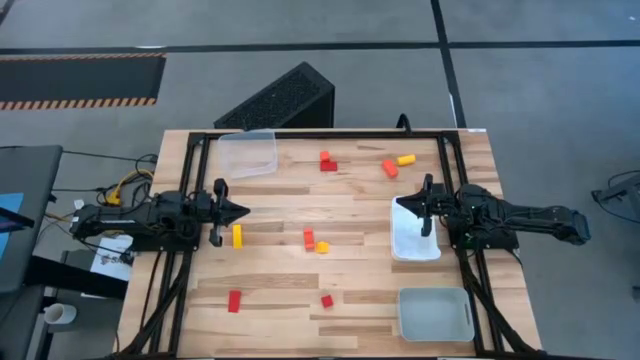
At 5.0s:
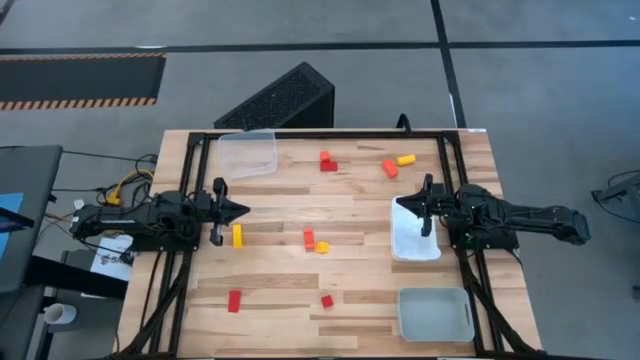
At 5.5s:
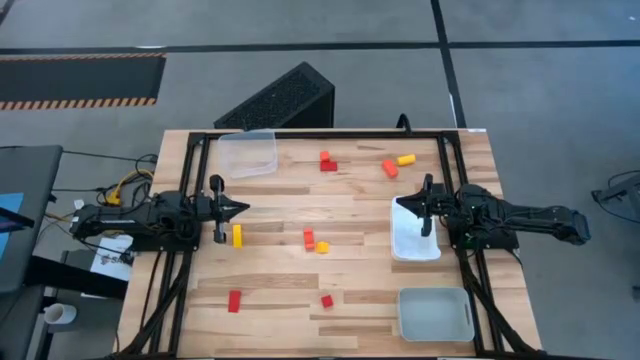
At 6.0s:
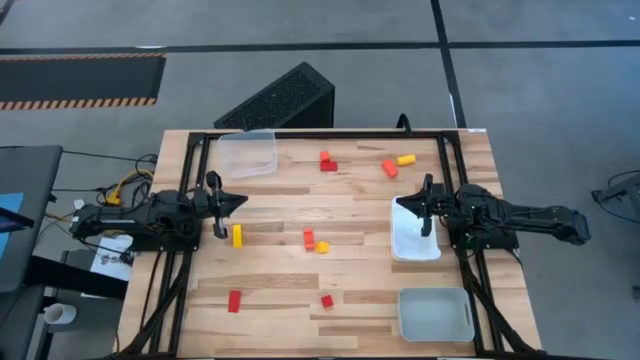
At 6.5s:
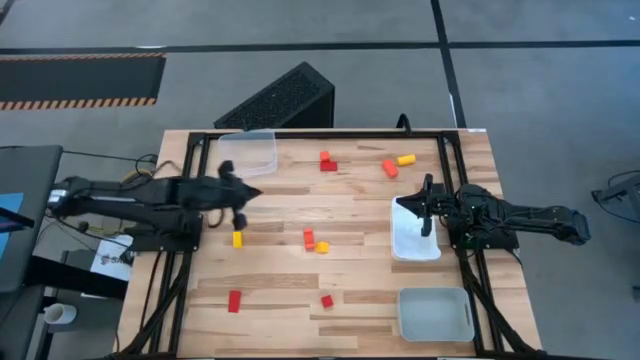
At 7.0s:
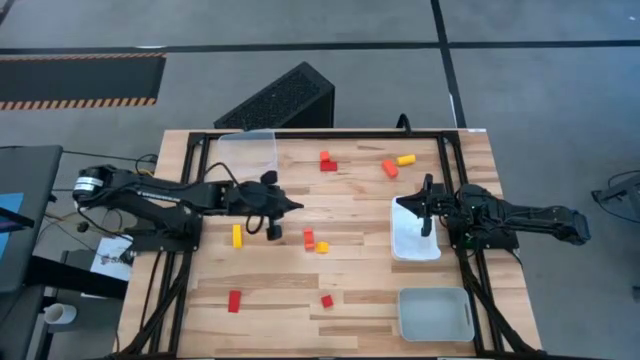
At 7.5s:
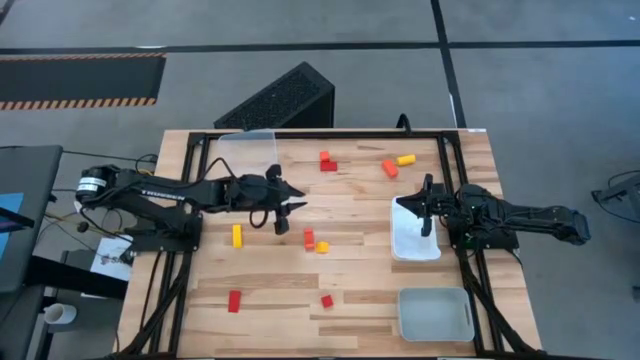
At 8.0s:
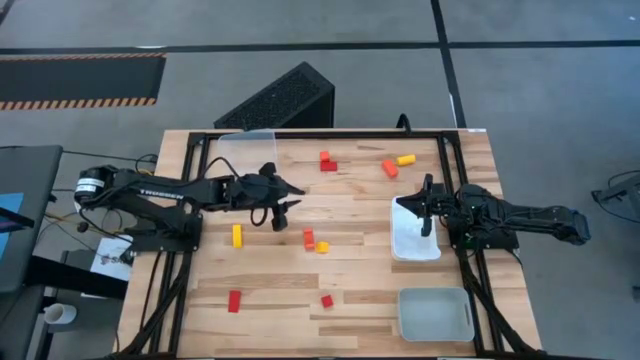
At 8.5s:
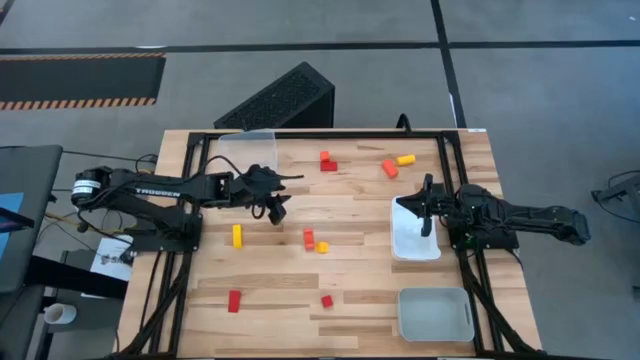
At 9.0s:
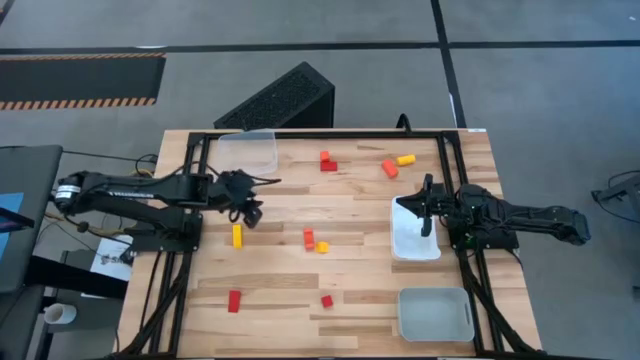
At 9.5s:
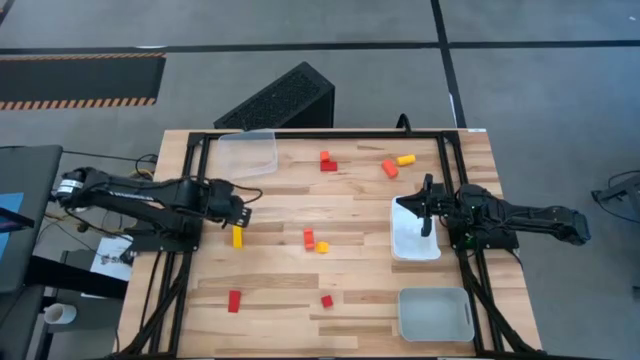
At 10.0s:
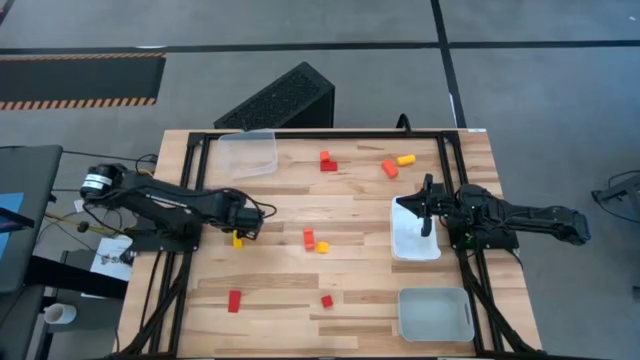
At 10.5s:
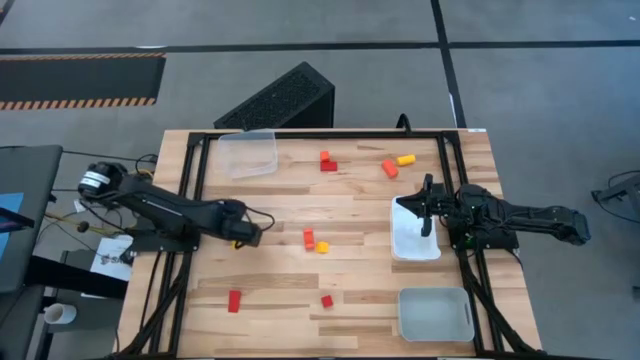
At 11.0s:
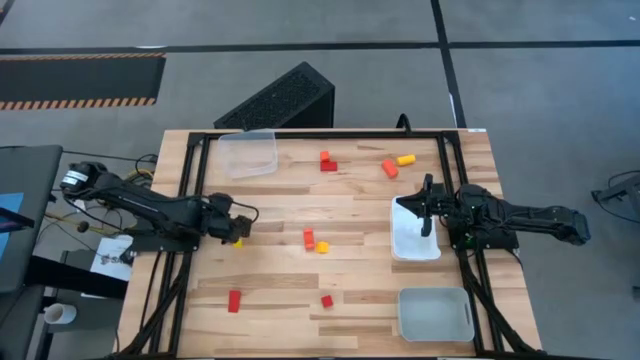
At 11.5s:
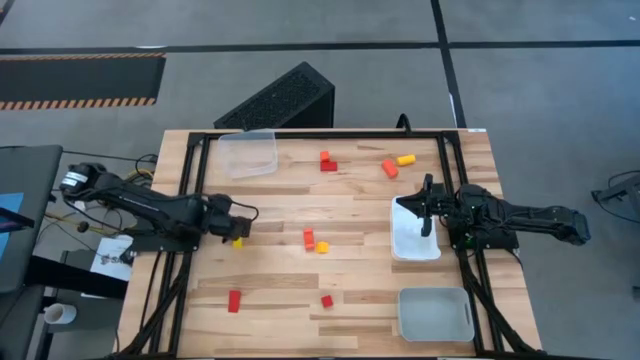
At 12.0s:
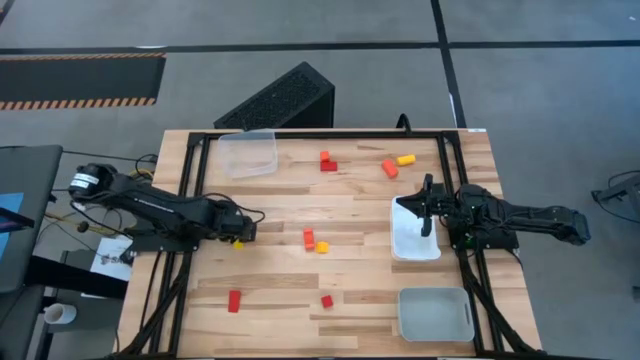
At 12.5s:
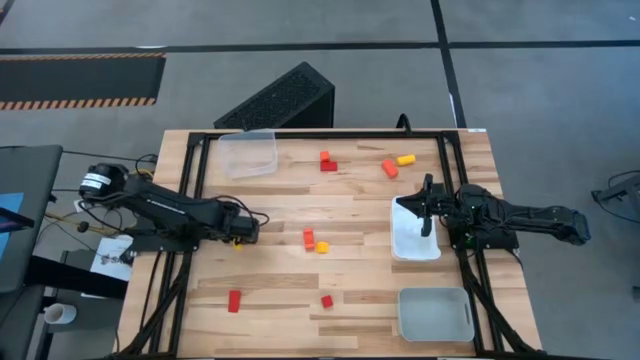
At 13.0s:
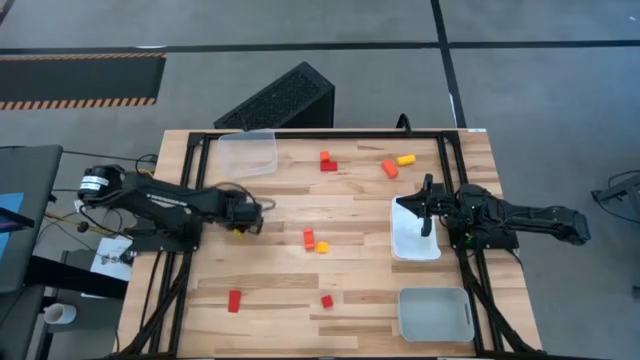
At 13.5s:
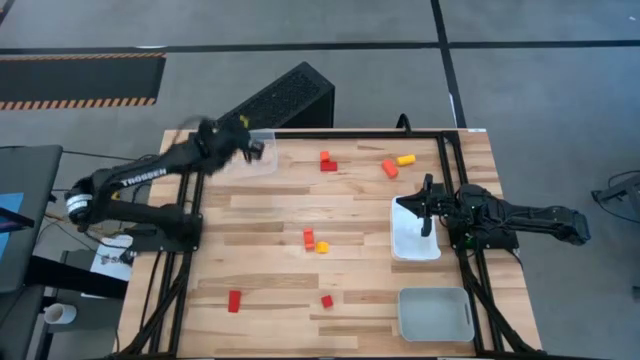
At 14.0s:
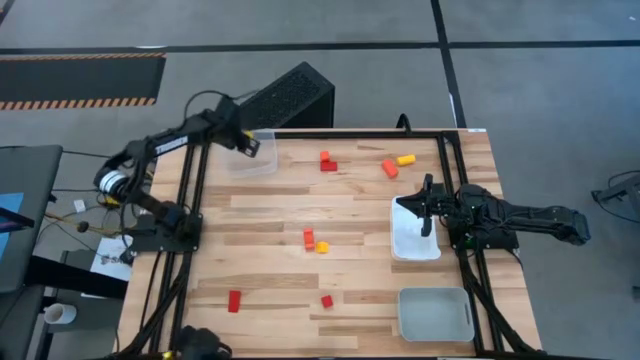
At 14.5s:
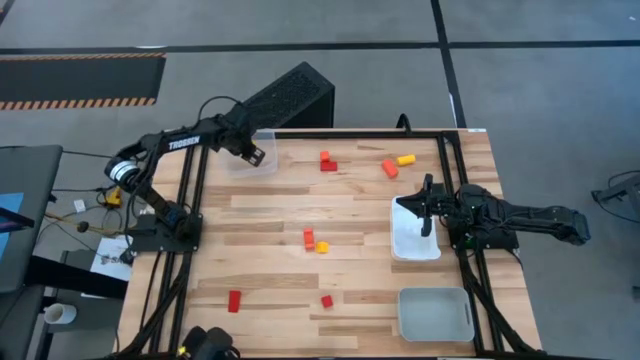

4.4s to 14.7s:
Task: Sort & place blocks by color
Put the left yellow block into the transparent bin

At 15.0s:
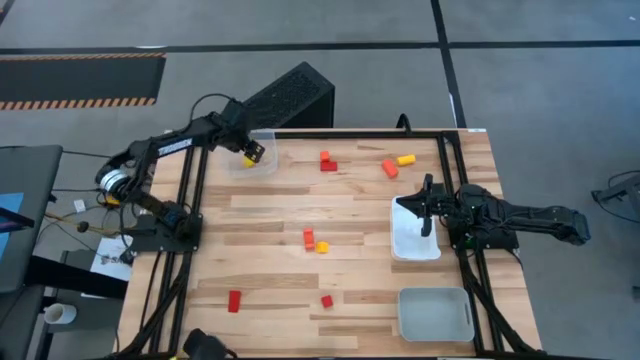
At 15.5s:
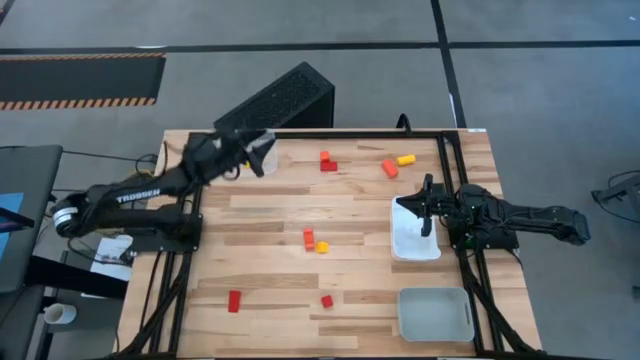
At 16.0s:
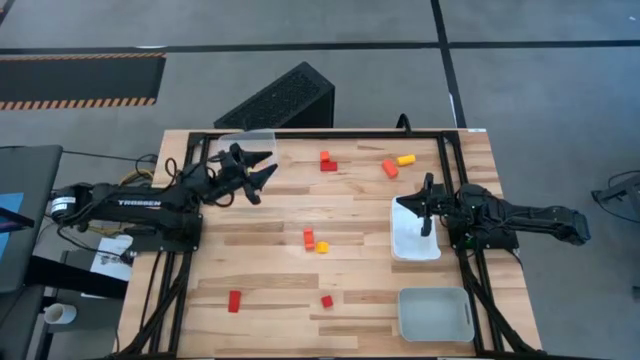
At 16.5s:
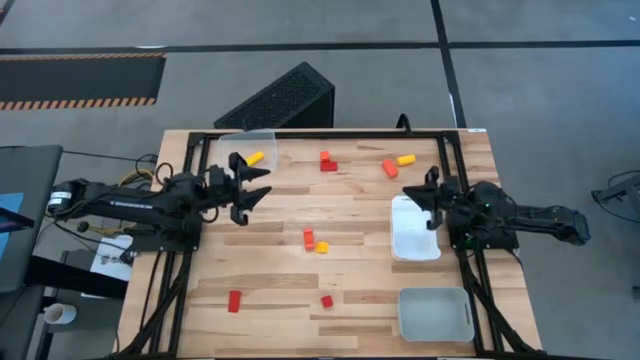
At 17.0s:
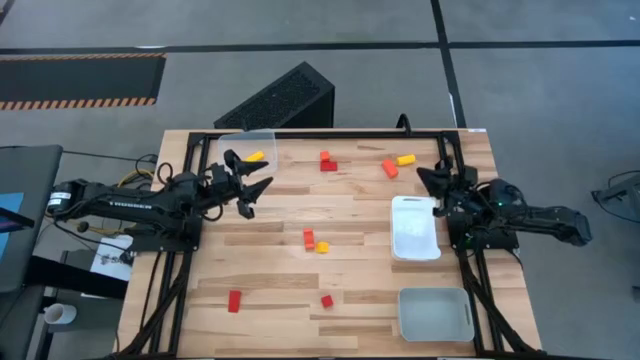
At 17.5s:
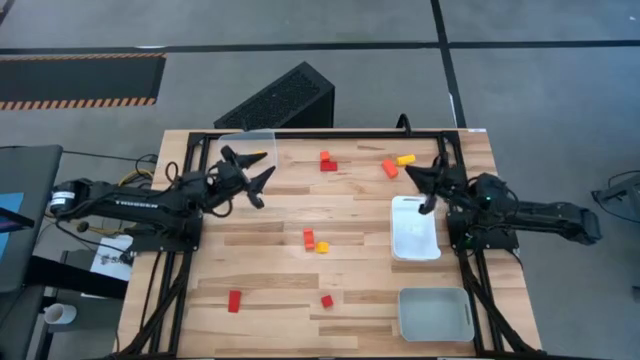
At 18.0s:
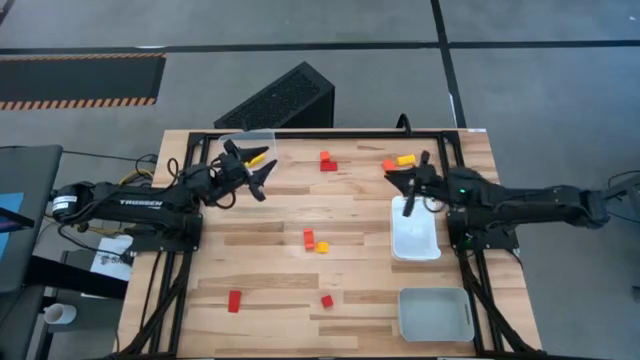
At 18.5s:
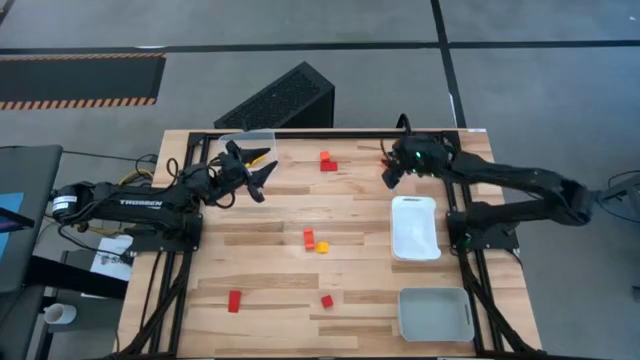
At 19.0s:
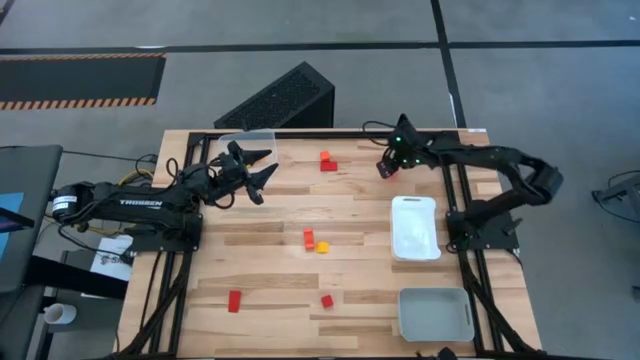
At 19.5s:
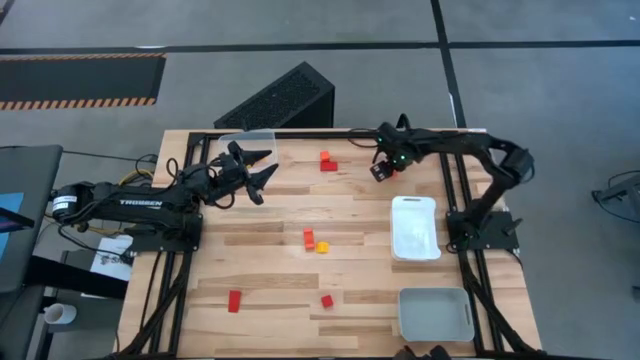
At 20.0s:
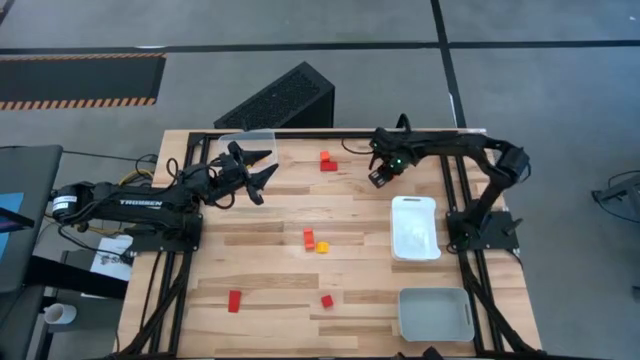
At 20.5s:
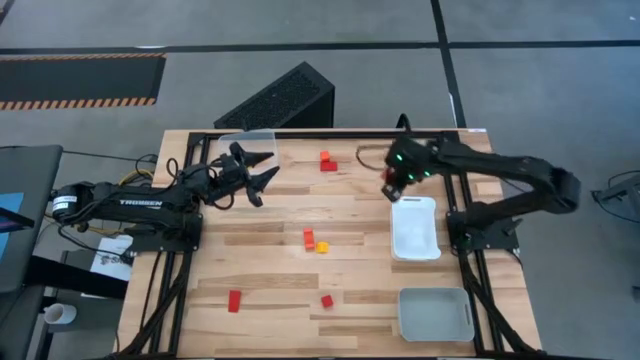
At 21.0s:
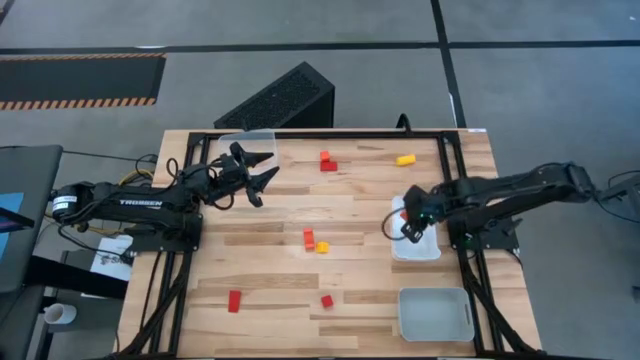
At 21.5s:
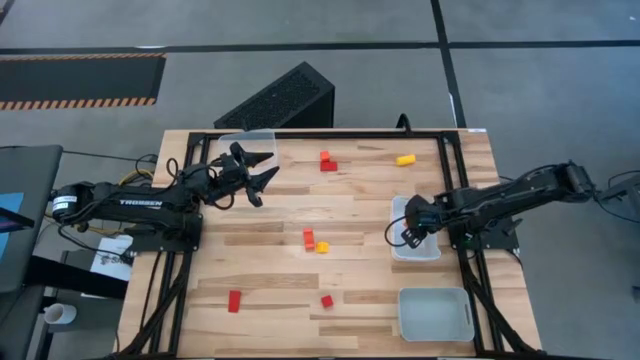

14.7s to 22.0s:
Put the top right orange block into the white bin

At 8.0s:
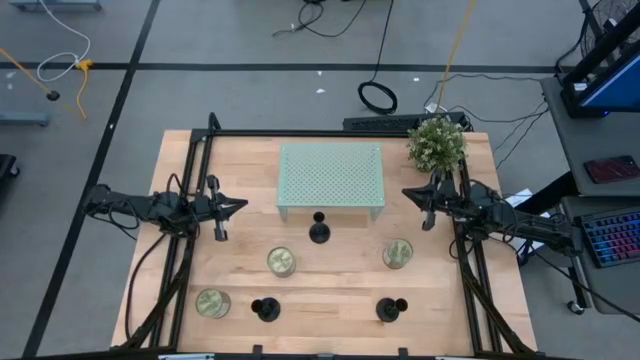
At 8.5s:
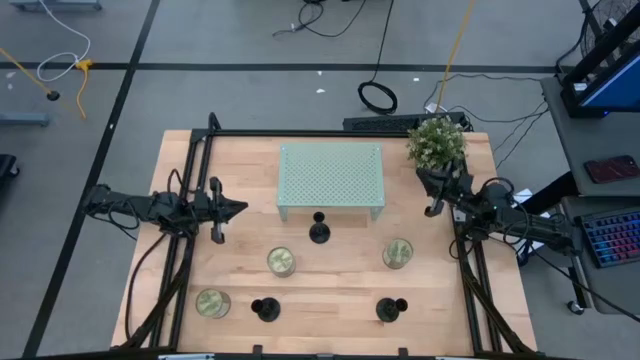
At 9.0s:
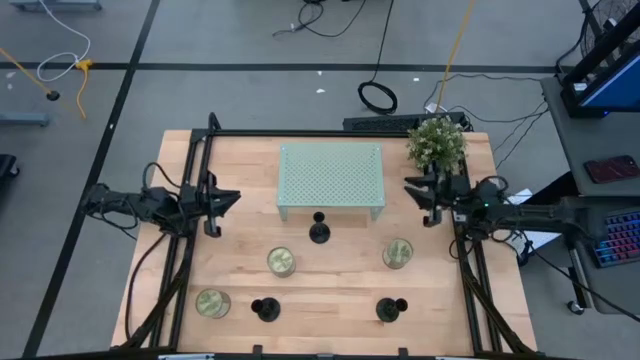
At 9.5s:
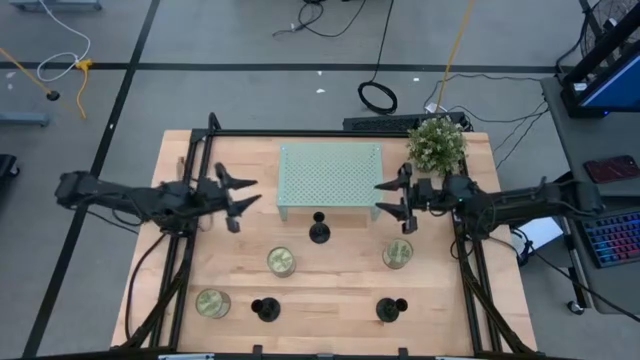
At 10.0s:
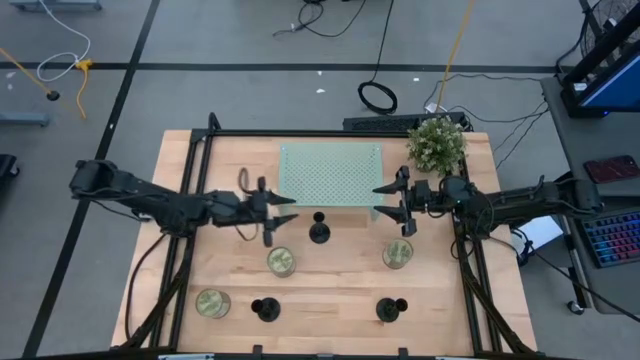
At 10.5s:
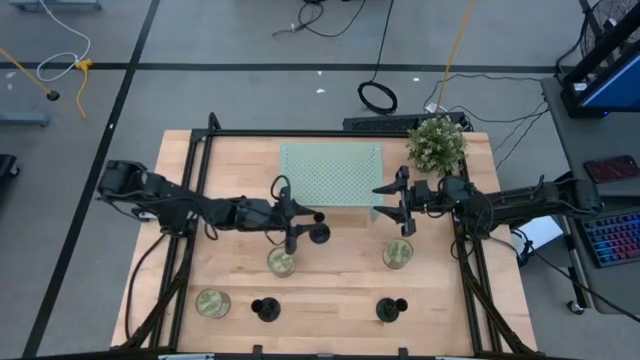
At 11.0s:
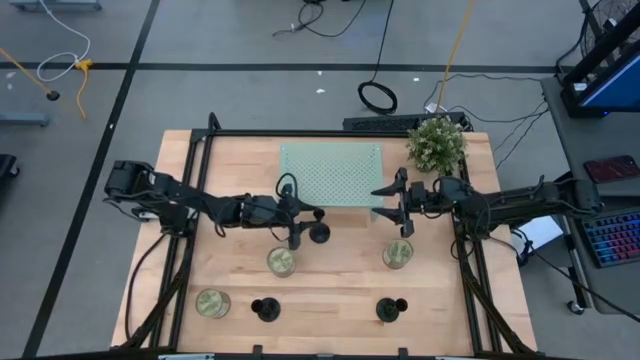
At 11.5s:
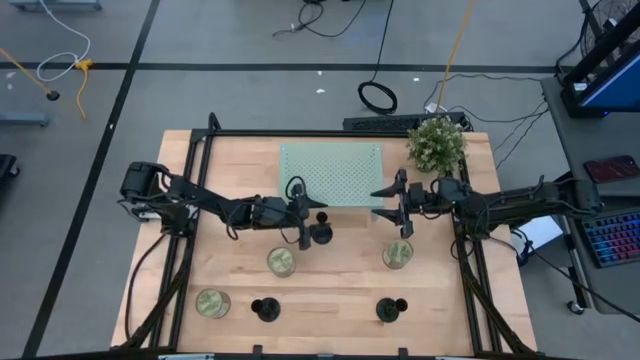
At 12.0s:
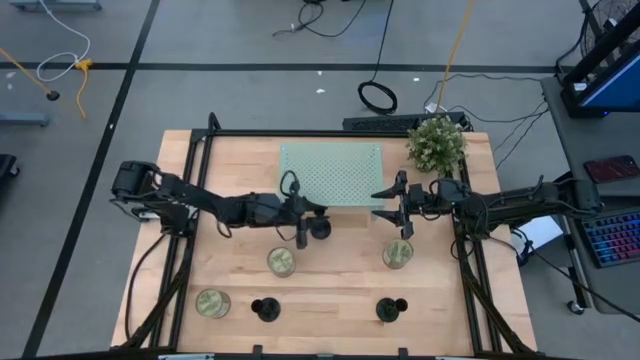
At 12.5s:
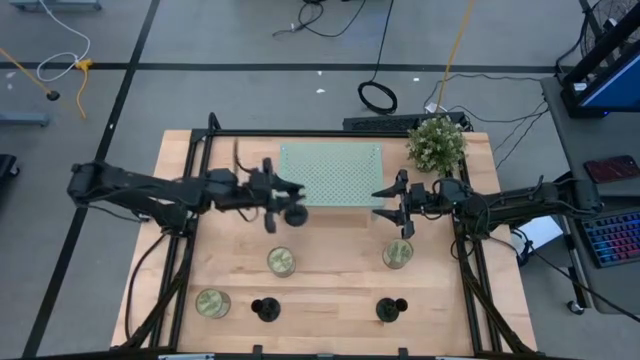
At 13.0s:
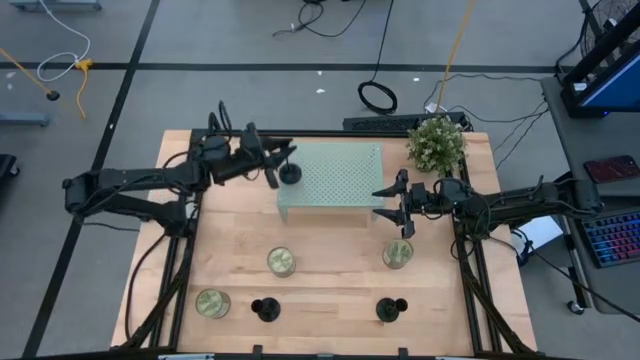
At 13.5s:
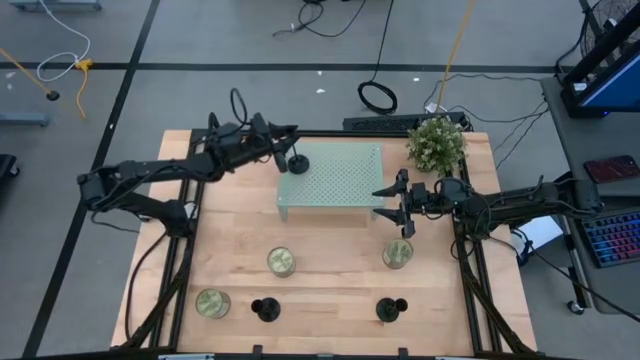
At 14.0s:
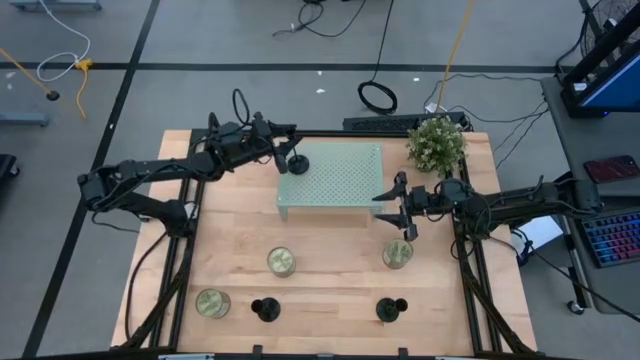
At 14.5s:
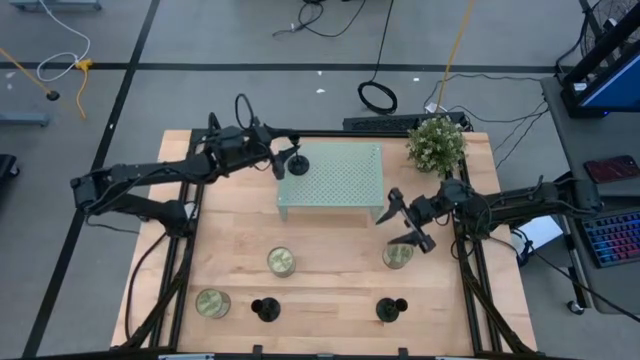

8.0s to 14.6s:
Task: Stock candles and holders on shelf
Put the black candle holder on the shelf
